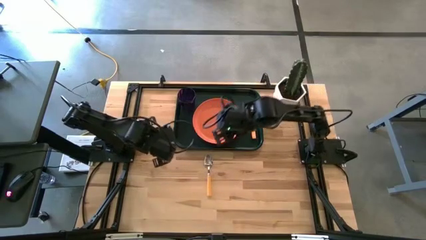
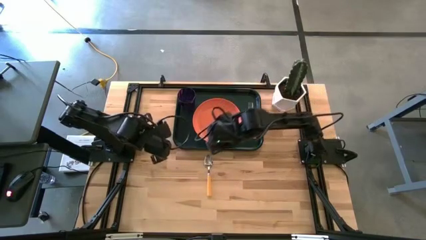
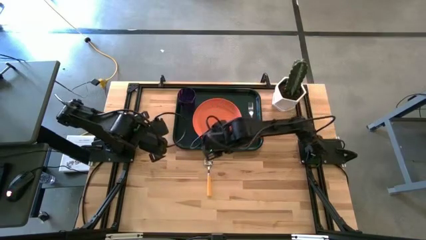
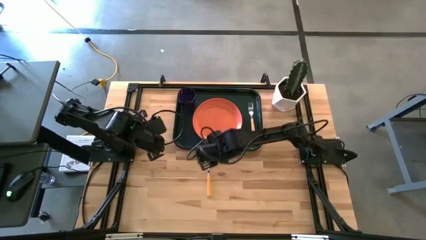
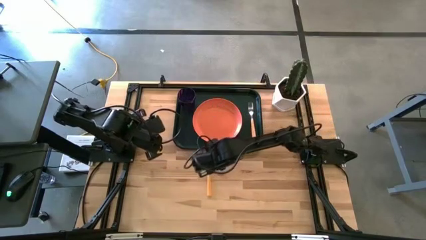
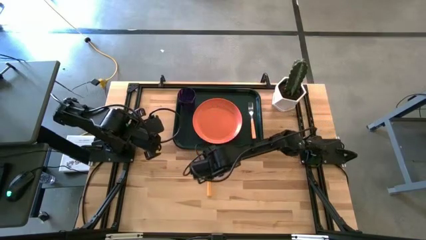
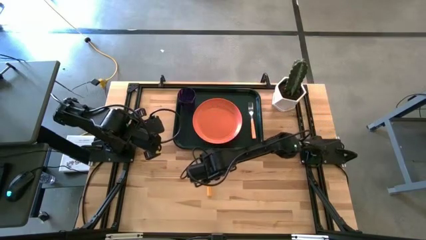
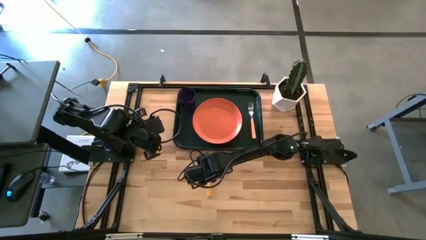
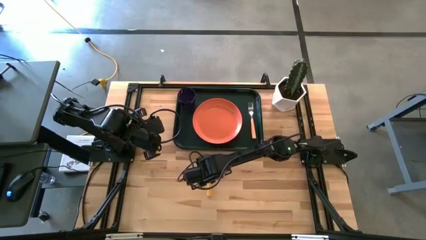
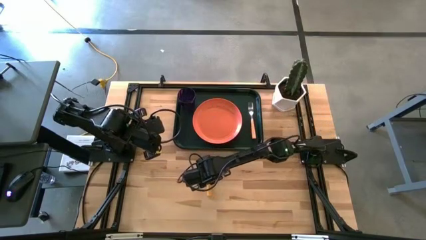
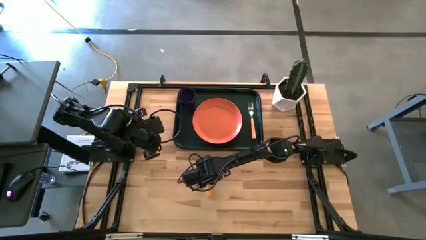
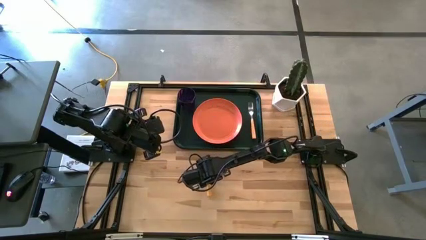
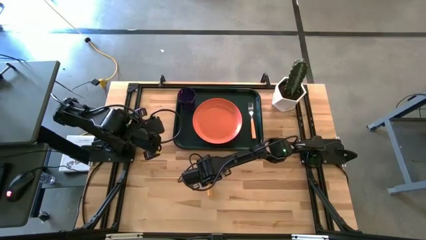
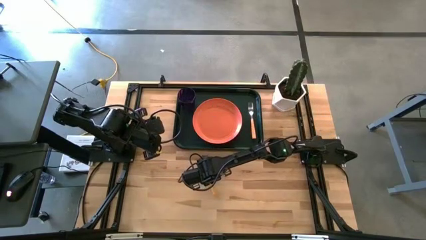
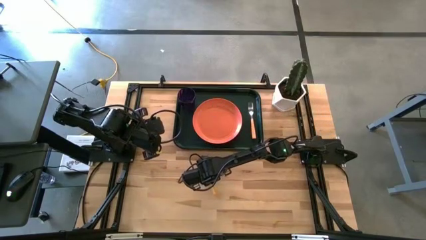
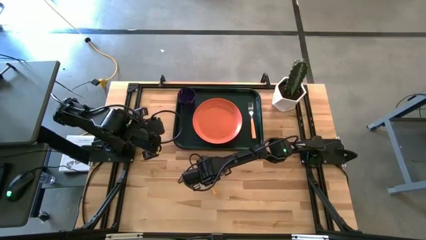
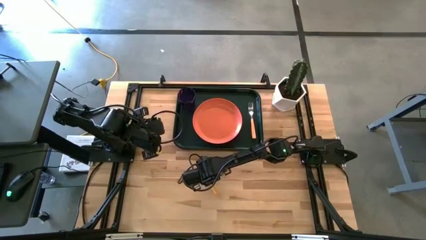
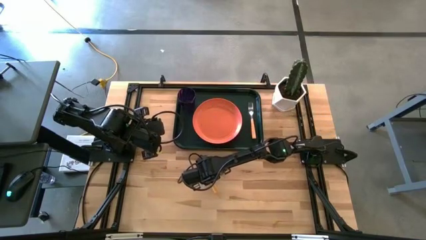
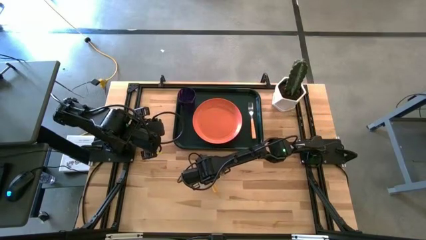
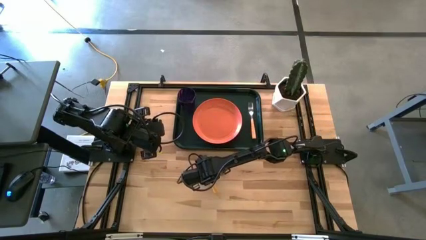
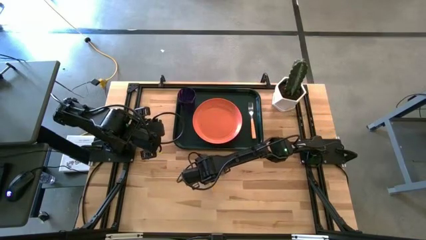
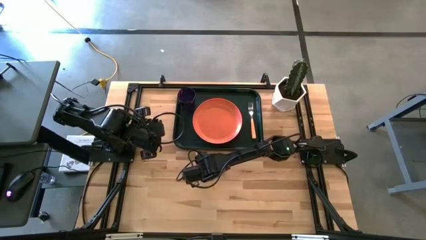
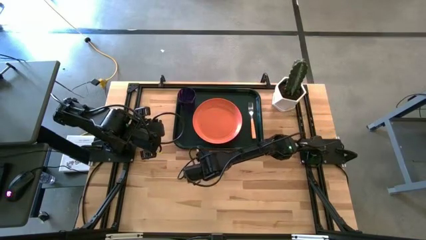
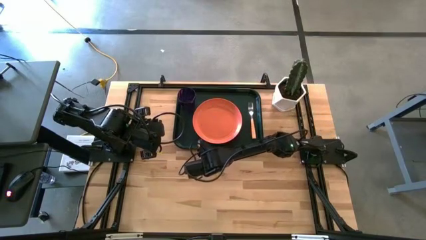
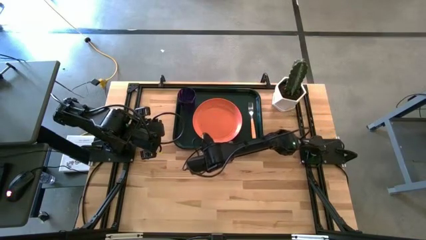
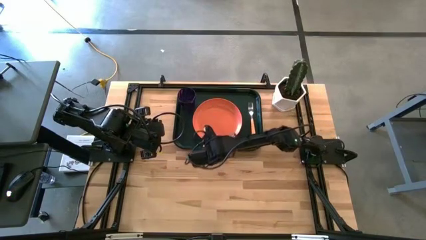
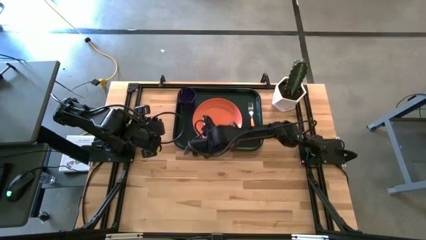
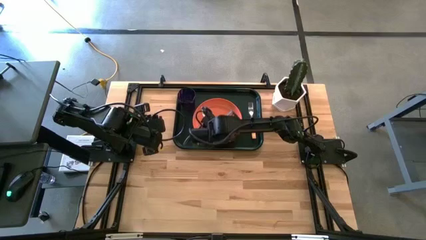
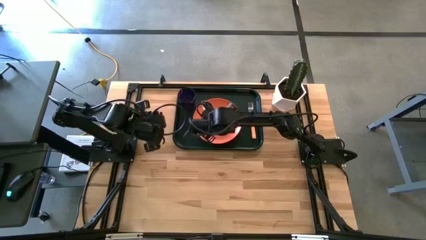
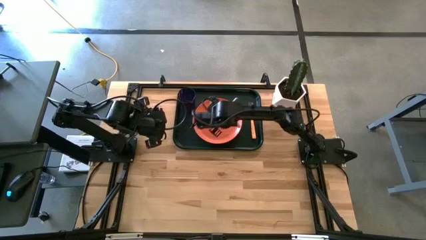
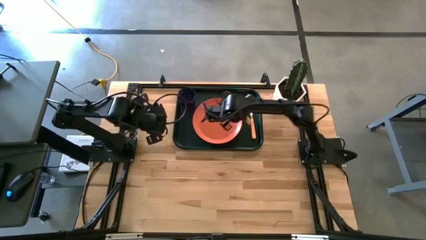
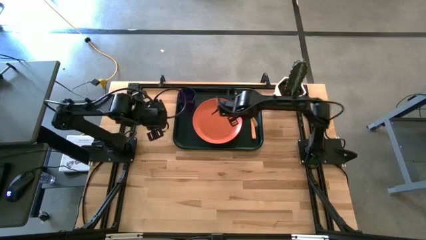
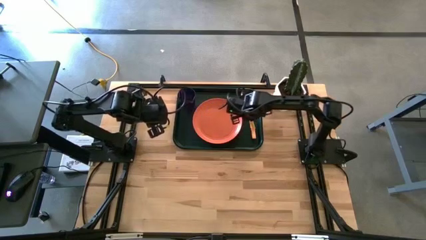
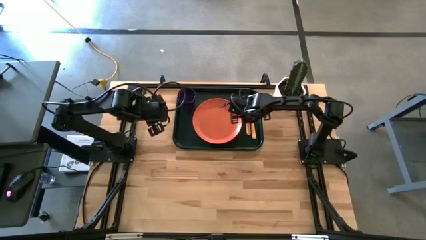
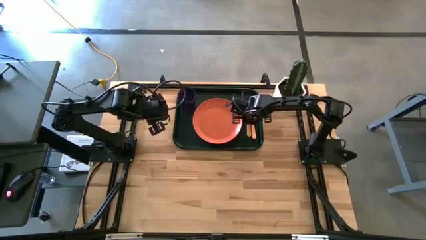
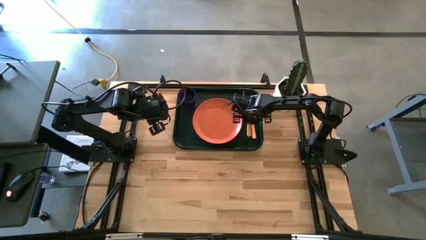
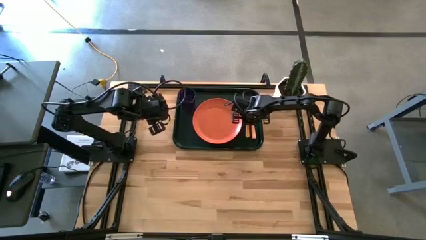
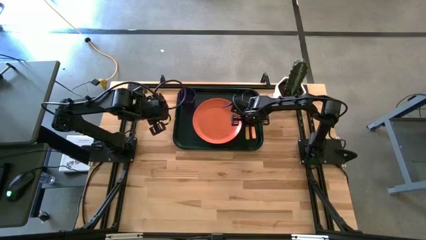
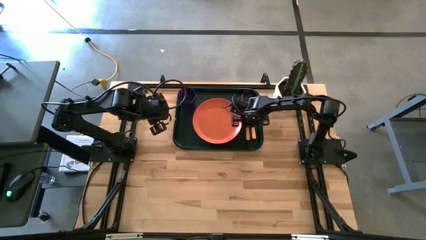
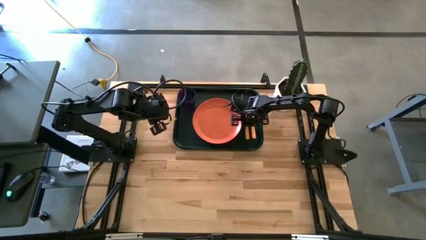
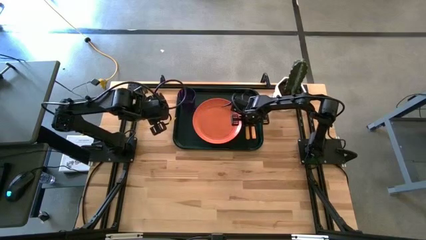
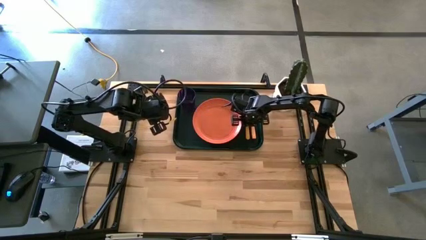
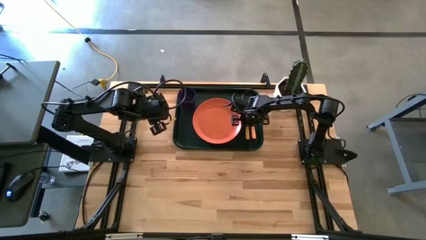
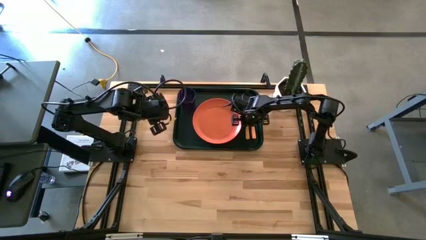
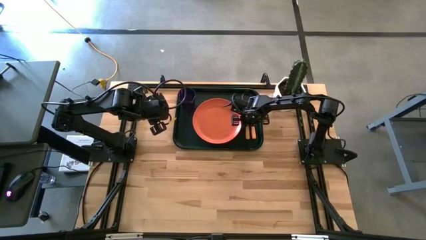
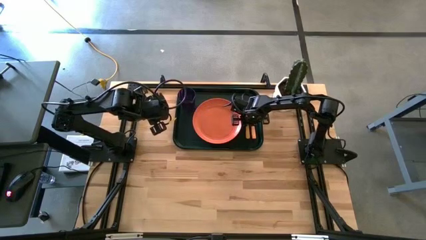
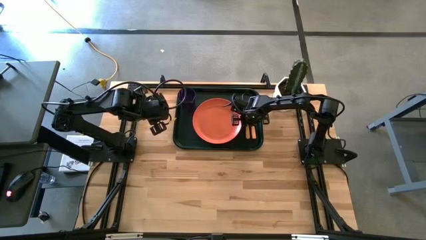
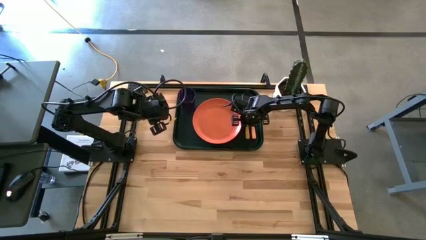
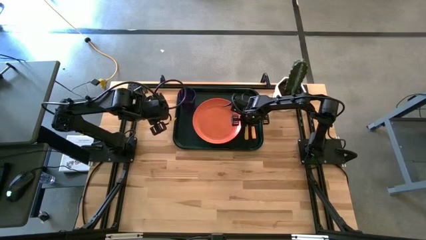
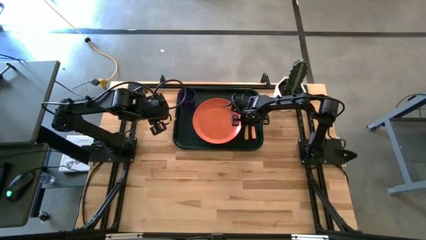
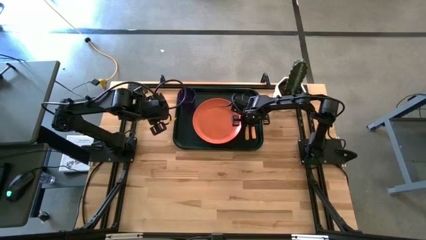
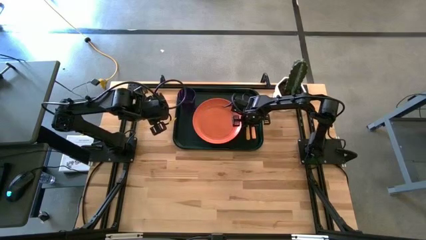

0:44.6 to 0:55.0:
Task: Pick and place plate/cup/fork/spoon on tray
Put the yellow spoon on the black serving tray to the left of the yellow fork

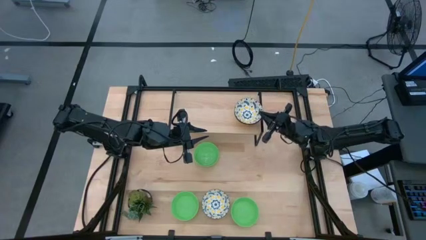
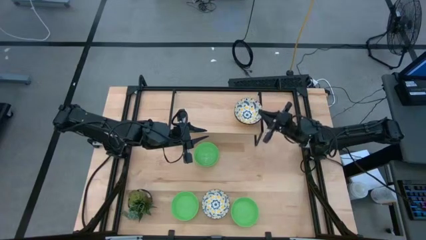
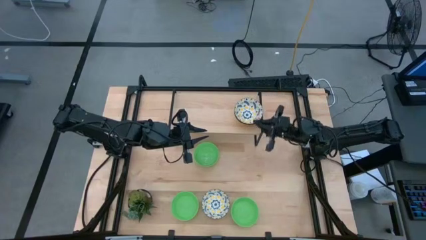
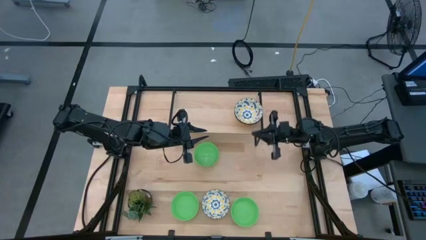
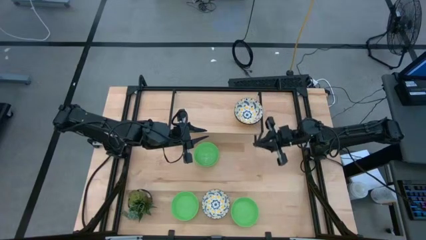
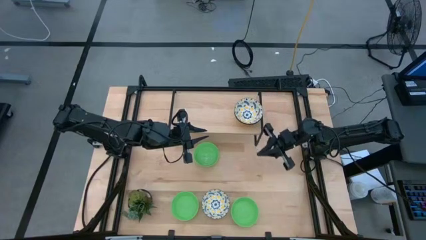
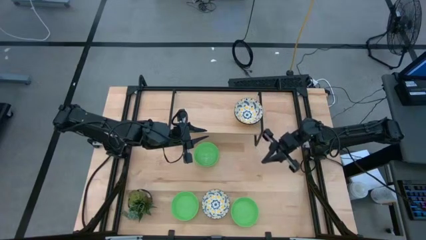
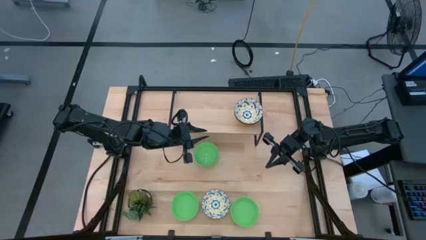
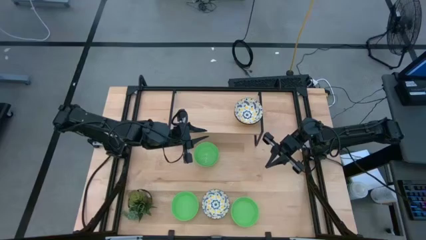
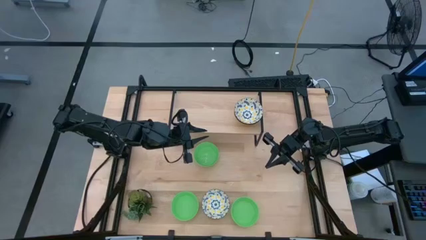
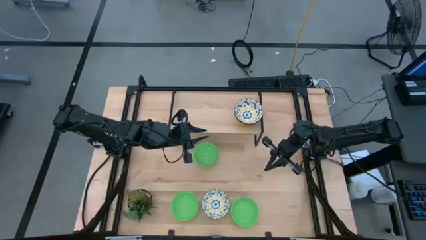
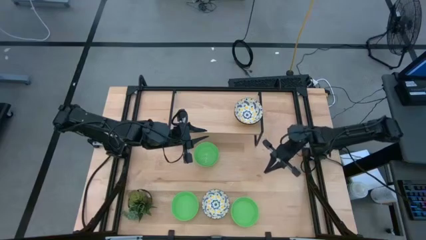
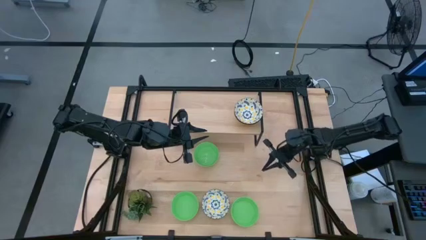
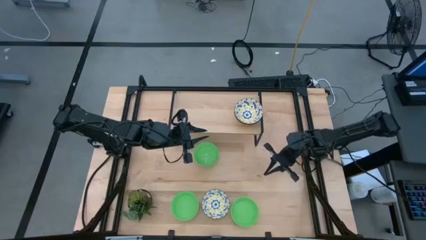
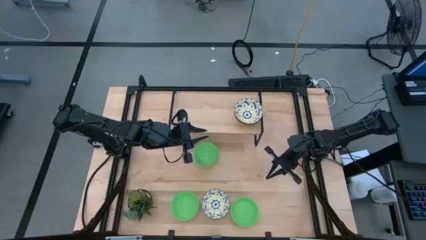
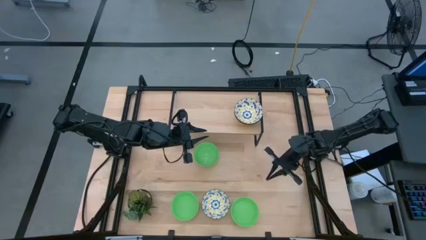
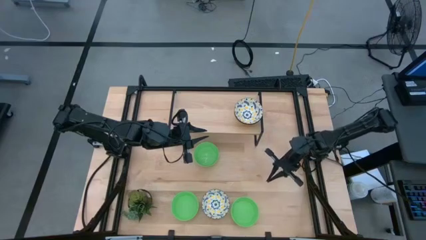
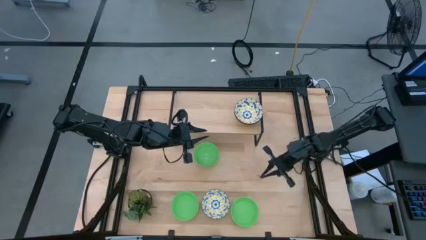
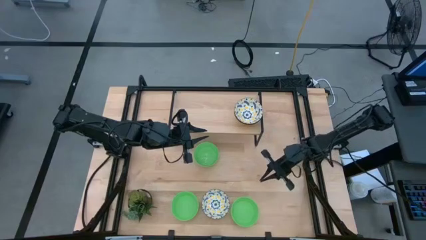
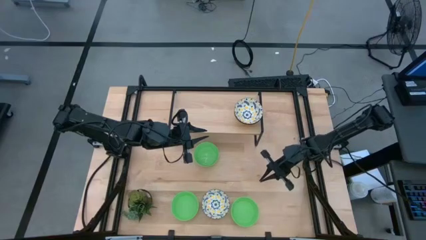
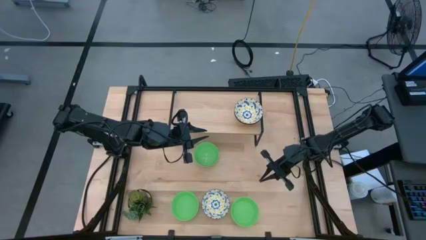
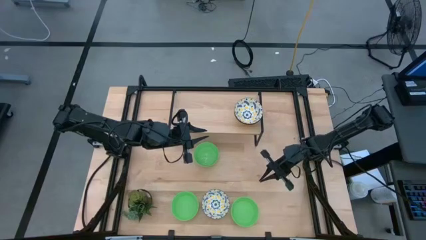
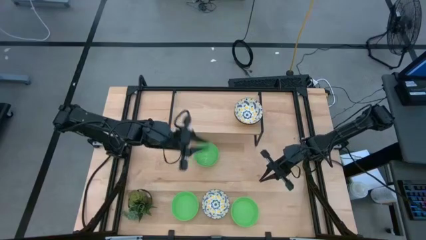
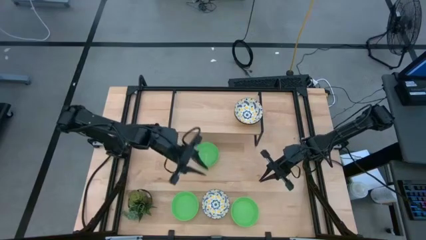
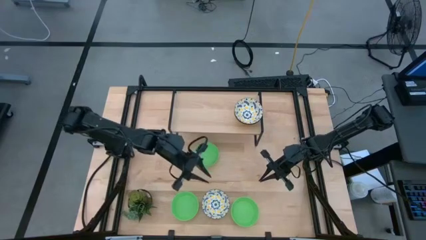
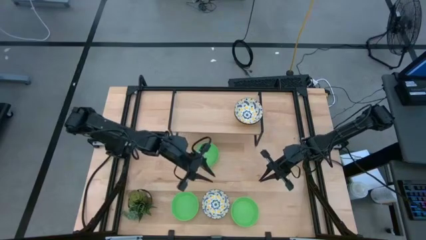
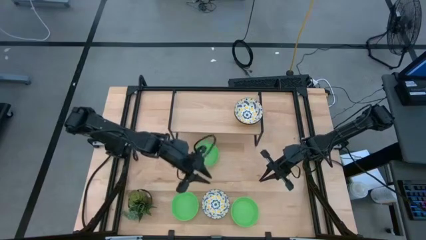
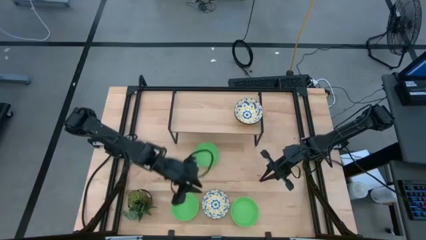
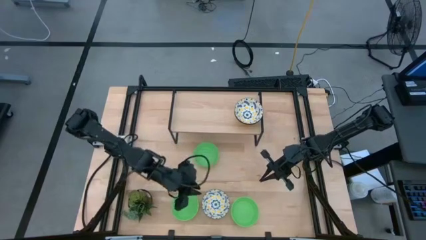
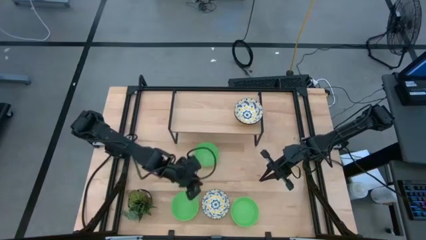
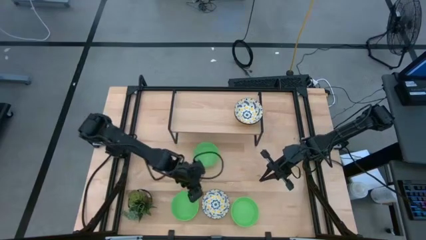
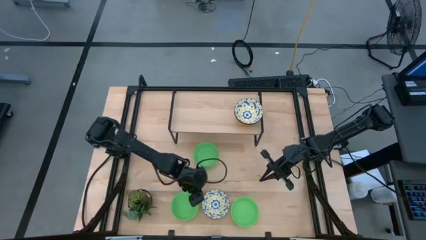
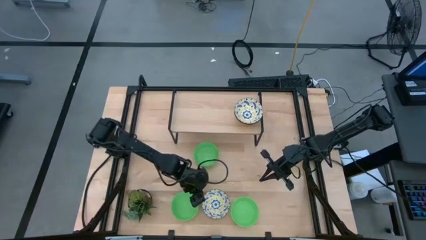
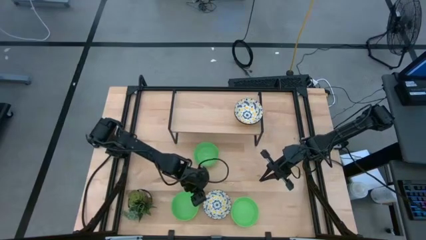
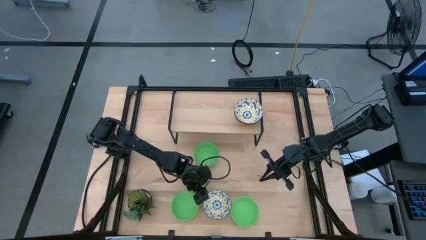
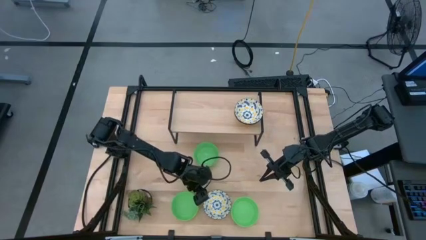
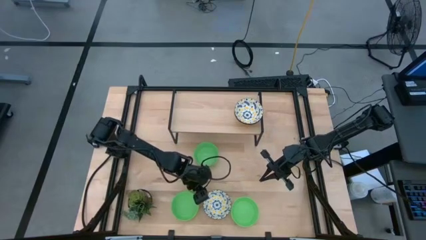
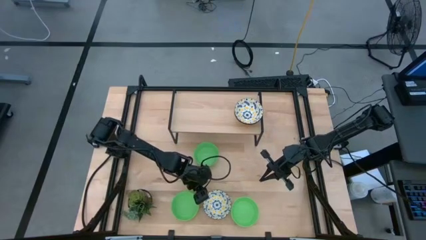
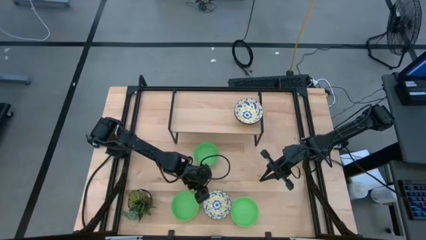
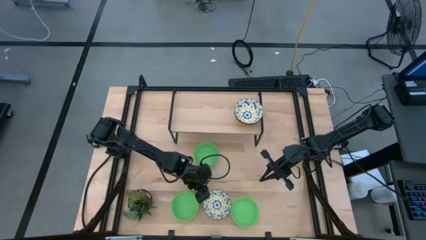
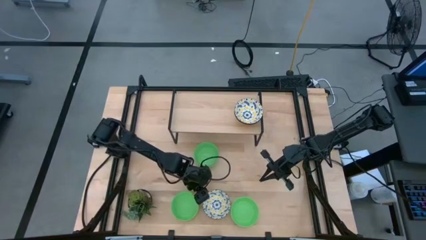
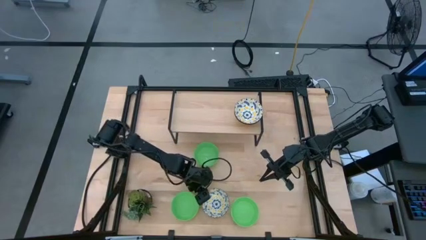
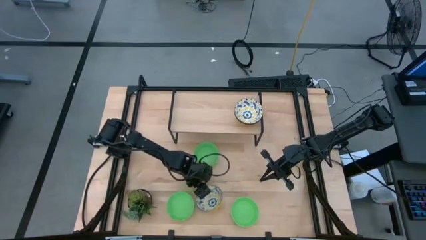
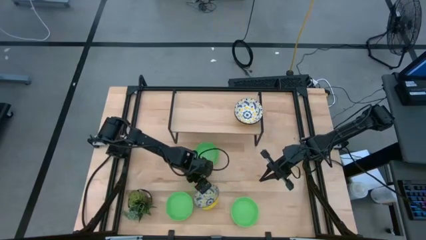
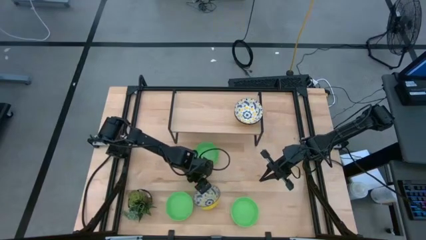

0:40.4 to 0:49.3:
Task: Pick & Place Mini bowls
Stack the white bowl on top of the white bowl on the shelf
